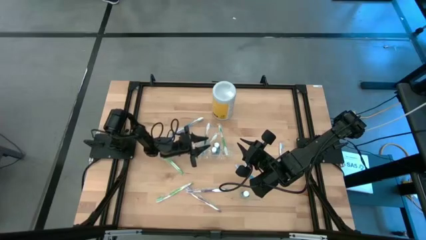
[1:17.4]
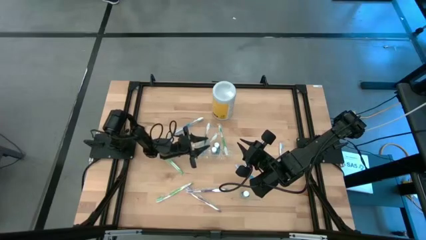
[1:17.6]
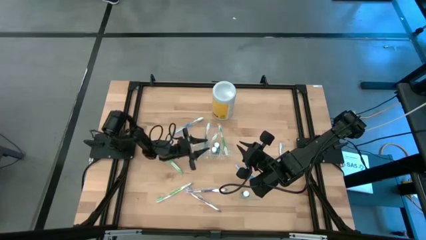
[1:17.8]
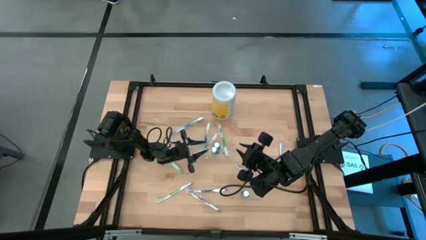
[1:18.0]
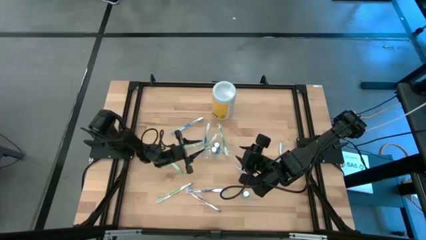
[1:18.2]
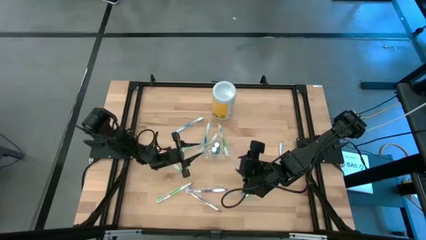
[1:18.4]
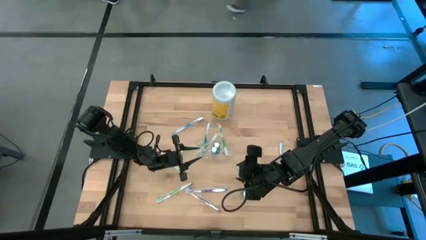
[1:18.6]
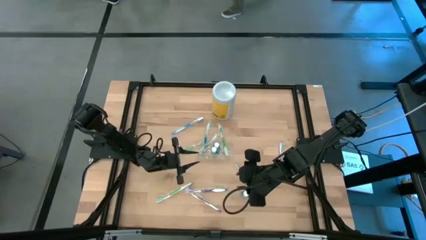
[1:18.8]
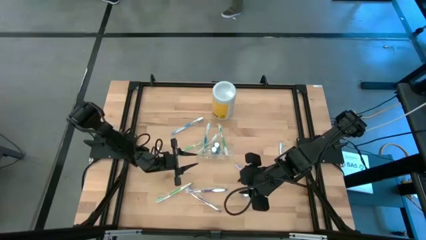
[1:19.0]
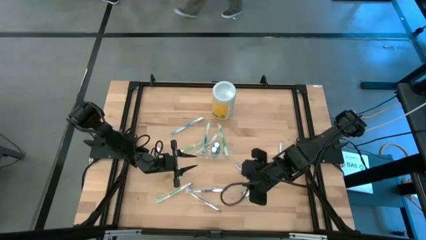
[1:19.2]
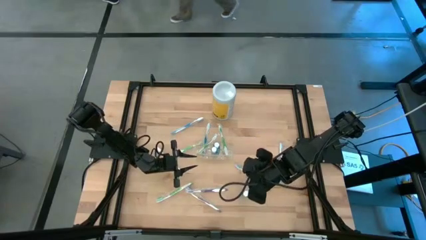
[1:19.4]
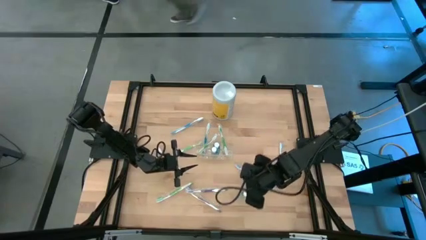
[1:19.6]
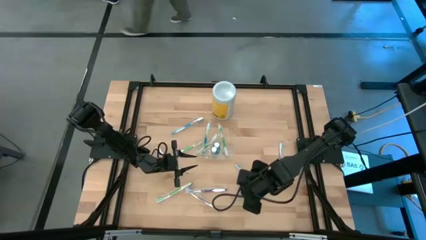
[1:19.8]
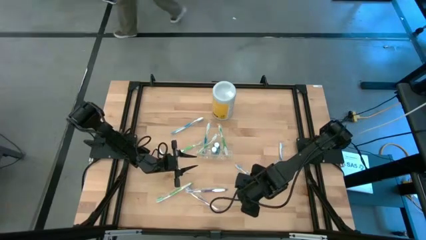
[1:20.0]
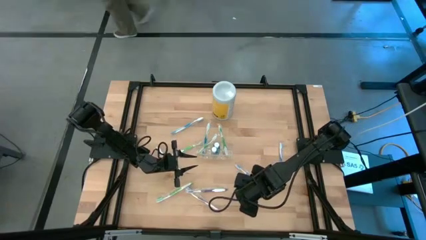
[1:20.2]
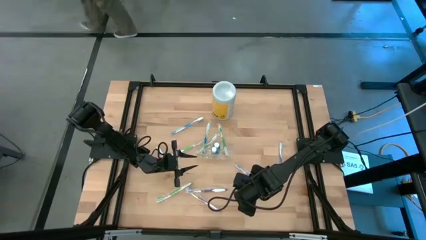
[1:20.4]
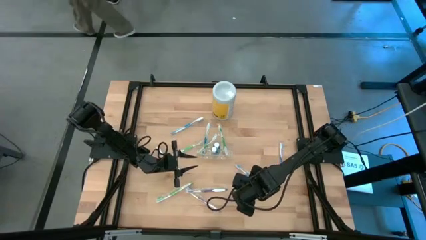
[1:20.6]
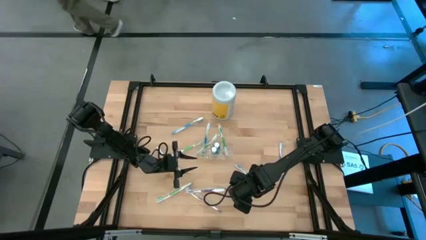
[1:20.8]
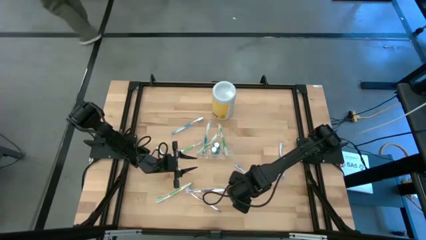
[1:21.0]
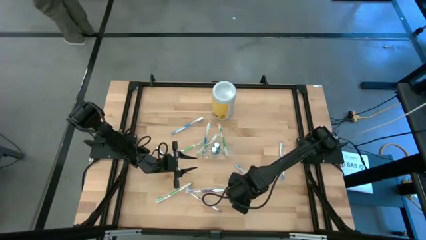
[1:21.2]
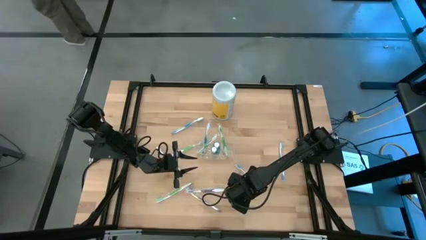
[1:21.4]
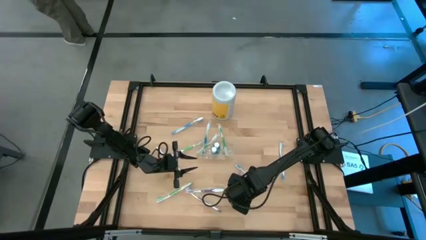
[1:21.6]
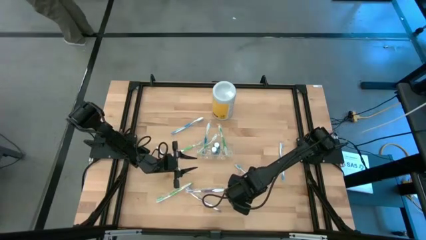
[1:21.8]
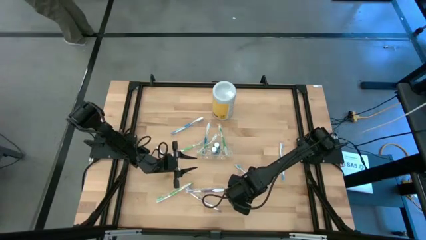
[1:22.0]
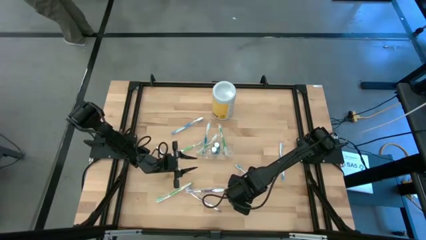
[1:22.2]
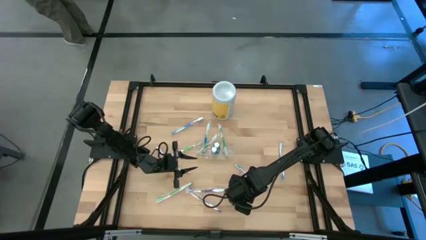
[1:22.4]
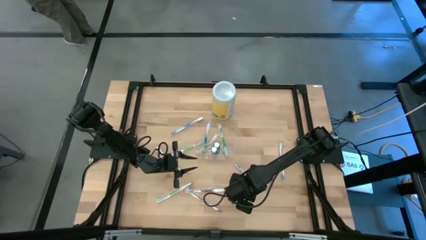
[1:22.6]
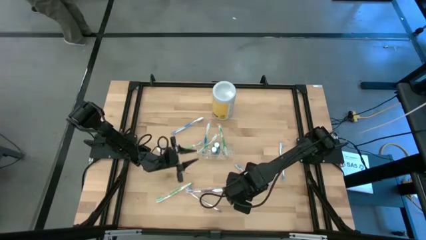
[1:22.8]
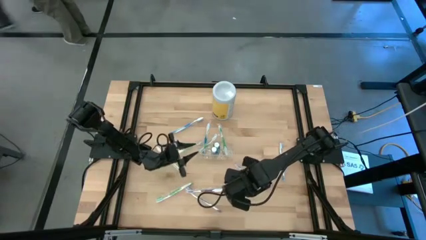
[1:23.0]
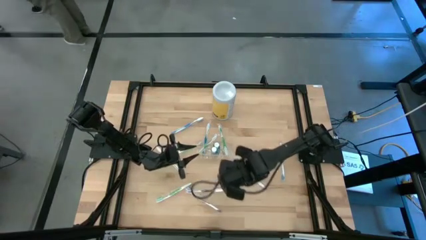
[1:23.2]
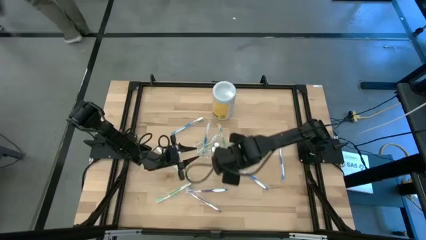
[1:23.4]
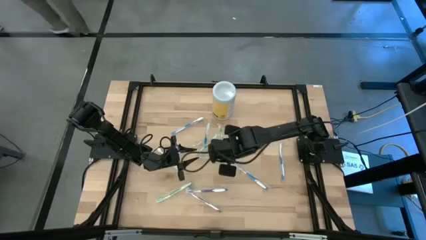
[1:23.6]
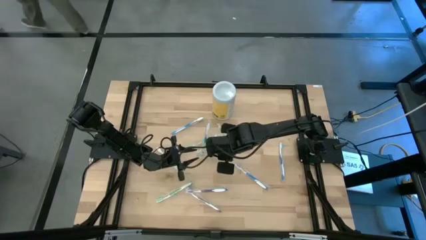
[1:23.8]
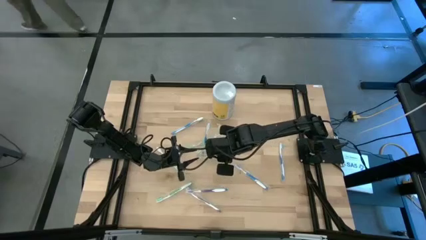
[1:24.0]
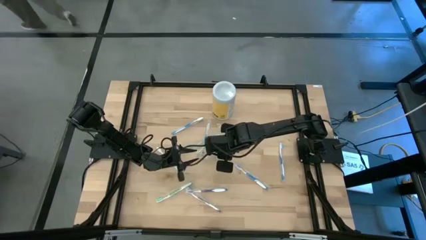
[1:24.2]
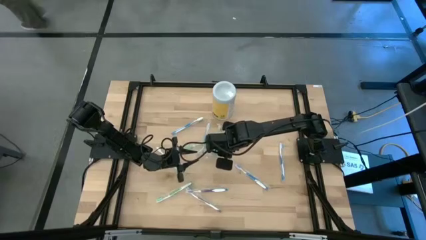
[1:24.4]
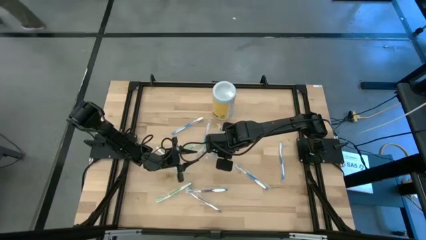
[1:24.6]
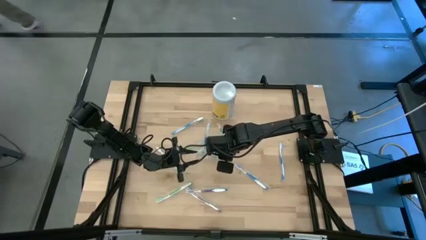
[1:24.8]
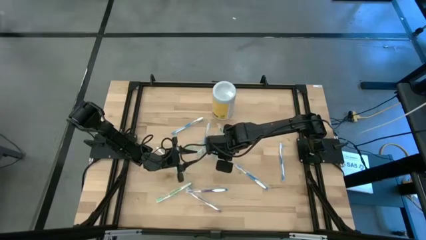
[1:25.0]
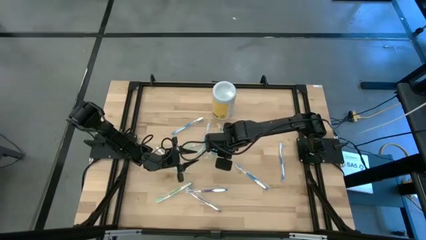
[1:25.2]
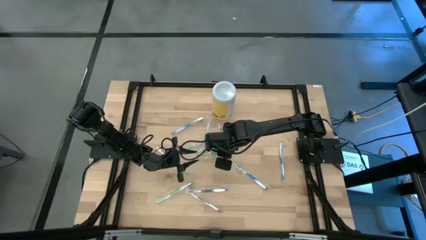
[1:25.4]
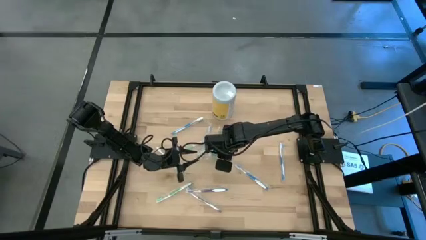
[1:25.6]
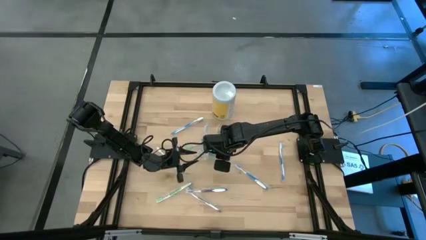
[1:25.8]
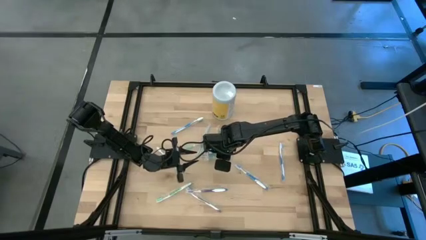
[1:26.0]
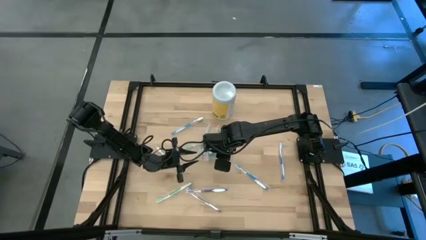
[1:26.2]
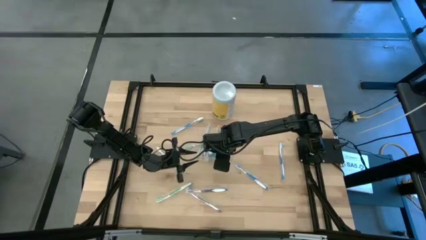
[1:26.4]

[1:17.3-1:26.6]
Task: Pick & Place toothbrushing station
Put the blue mouthwash into the transparent organizer
